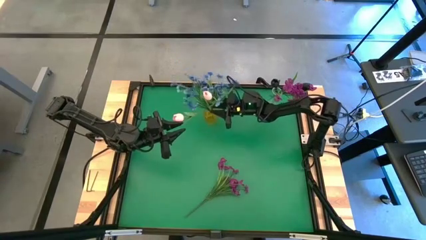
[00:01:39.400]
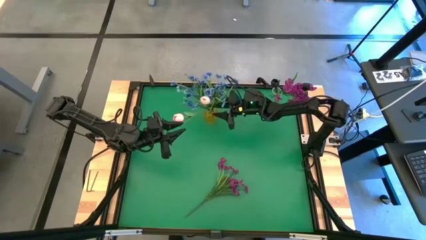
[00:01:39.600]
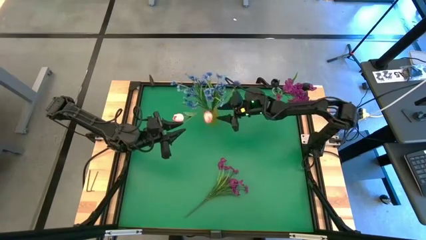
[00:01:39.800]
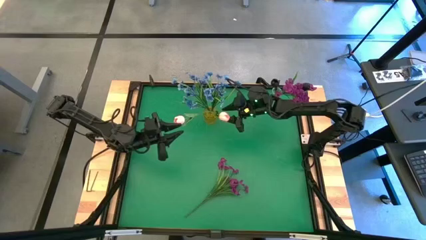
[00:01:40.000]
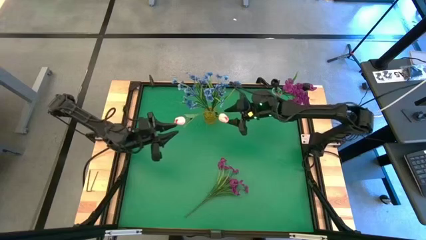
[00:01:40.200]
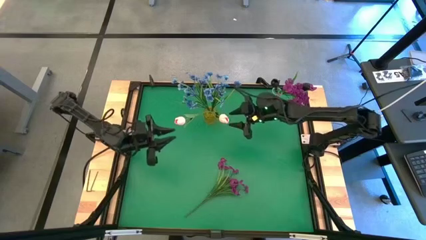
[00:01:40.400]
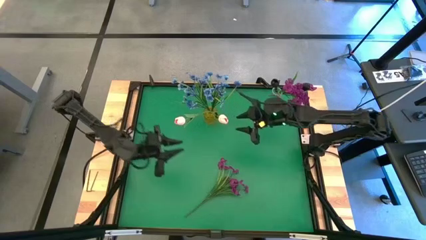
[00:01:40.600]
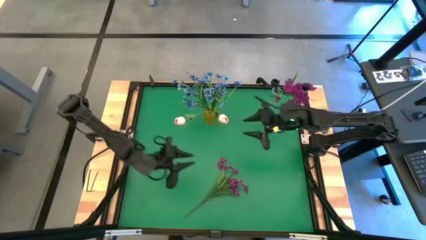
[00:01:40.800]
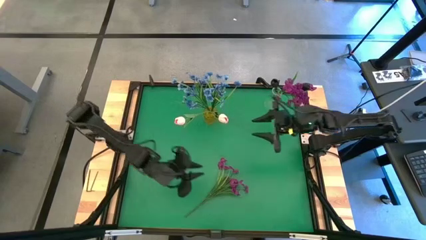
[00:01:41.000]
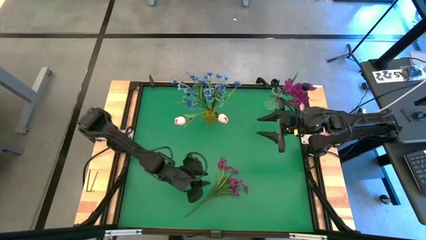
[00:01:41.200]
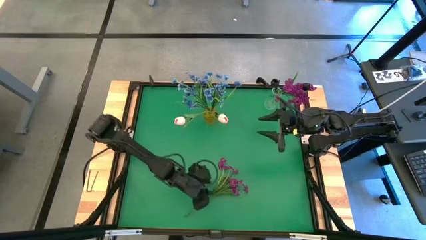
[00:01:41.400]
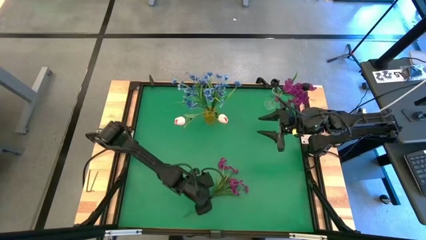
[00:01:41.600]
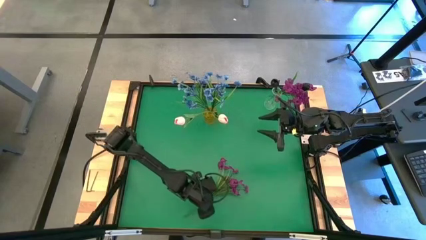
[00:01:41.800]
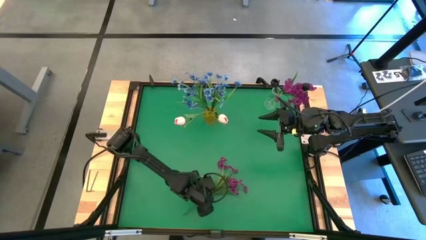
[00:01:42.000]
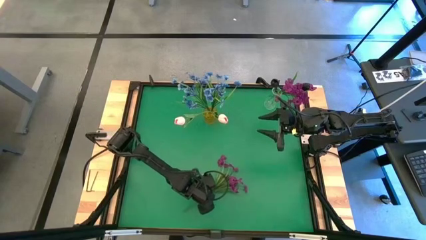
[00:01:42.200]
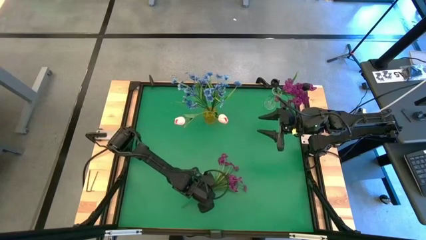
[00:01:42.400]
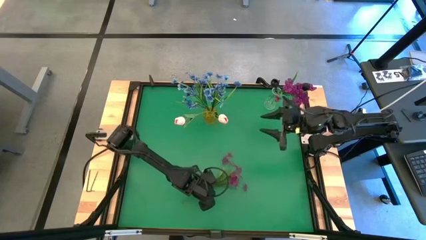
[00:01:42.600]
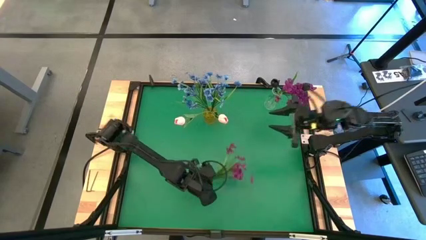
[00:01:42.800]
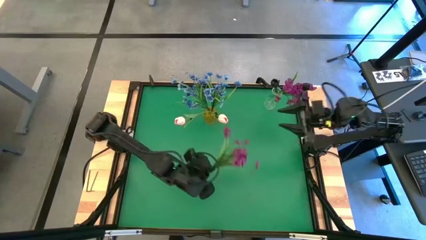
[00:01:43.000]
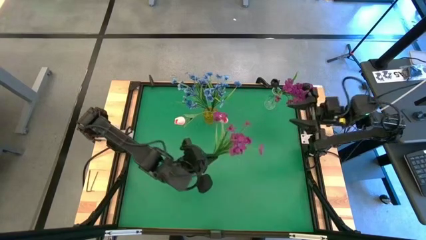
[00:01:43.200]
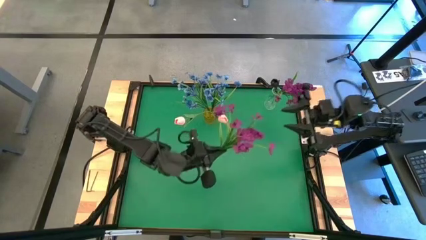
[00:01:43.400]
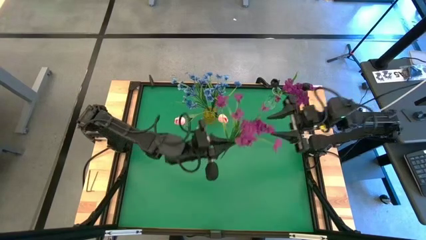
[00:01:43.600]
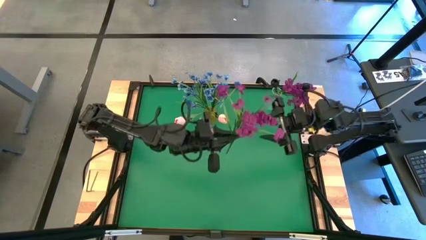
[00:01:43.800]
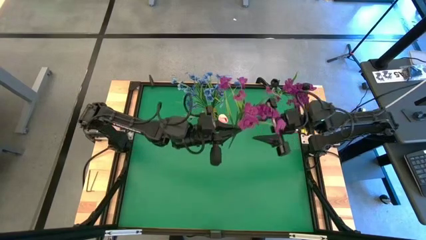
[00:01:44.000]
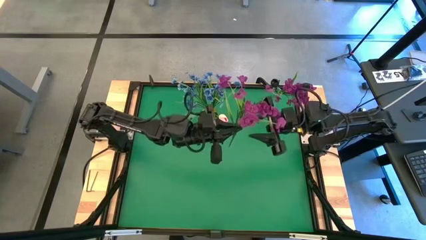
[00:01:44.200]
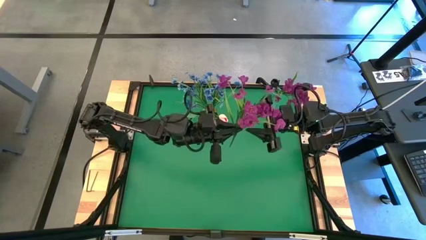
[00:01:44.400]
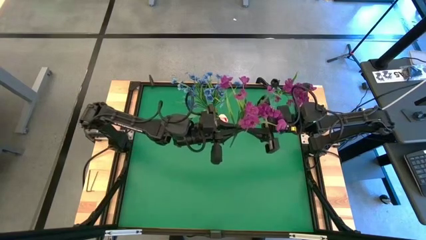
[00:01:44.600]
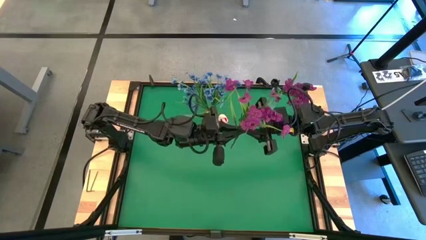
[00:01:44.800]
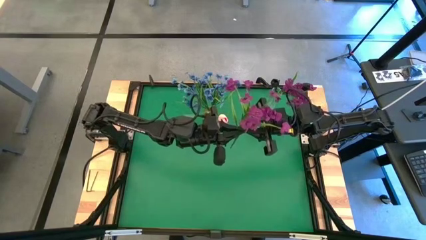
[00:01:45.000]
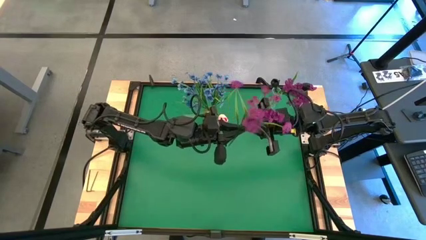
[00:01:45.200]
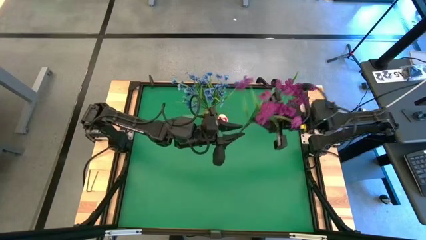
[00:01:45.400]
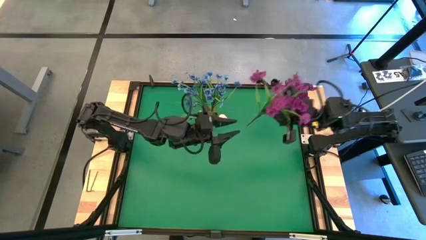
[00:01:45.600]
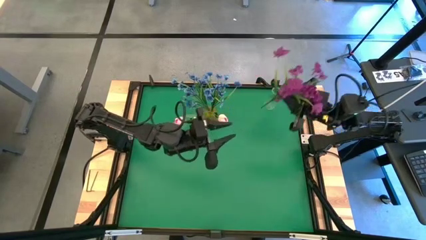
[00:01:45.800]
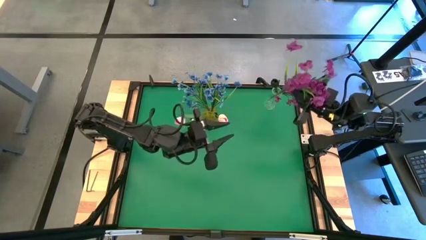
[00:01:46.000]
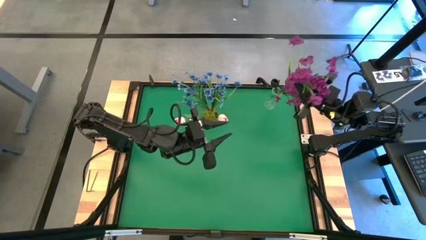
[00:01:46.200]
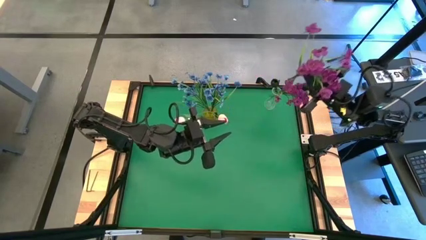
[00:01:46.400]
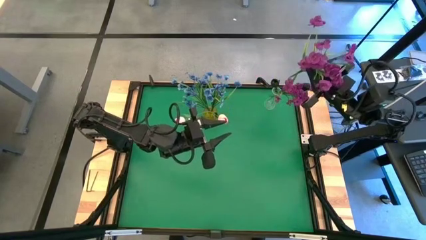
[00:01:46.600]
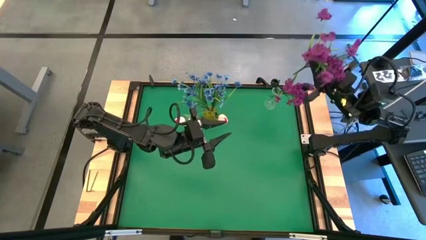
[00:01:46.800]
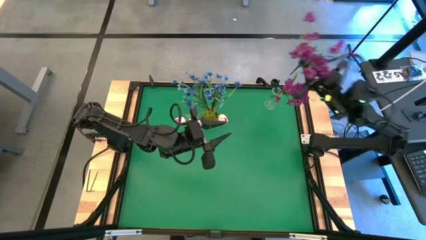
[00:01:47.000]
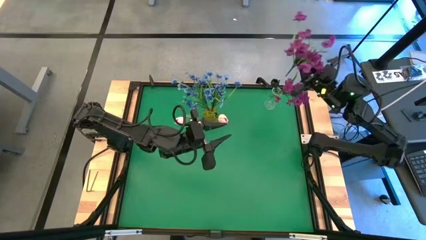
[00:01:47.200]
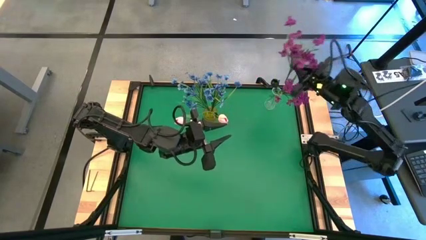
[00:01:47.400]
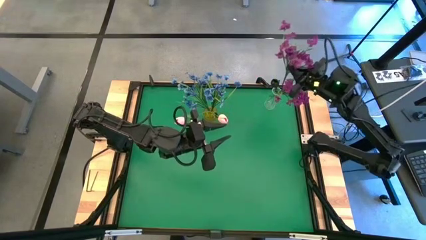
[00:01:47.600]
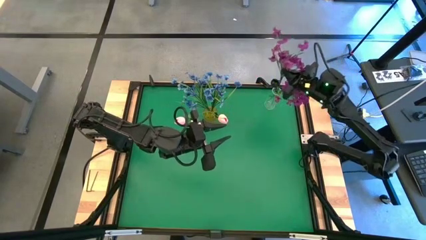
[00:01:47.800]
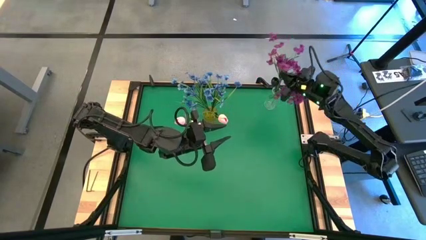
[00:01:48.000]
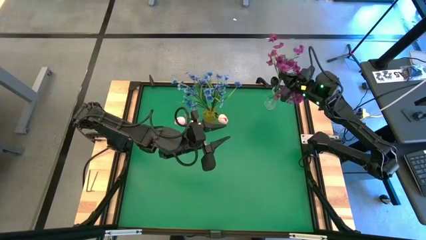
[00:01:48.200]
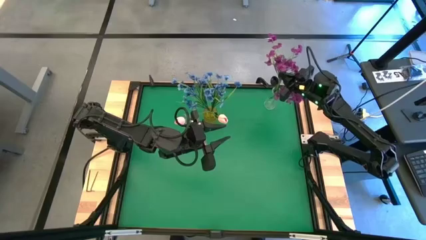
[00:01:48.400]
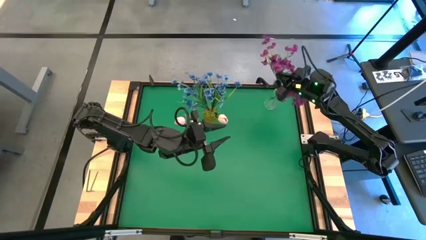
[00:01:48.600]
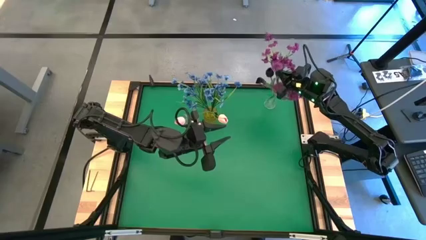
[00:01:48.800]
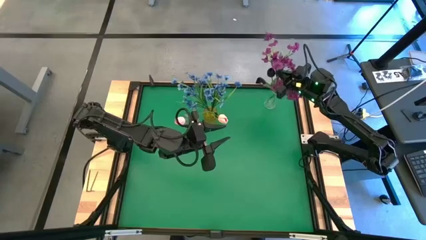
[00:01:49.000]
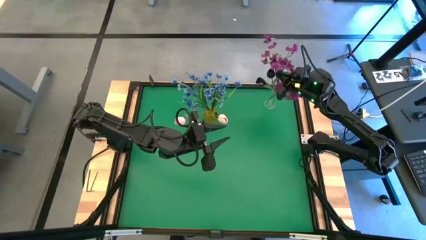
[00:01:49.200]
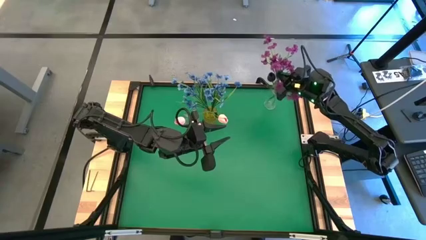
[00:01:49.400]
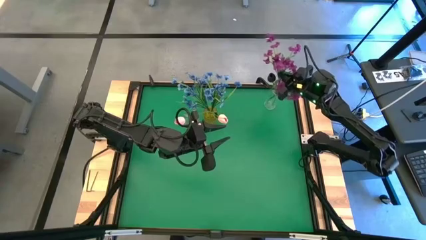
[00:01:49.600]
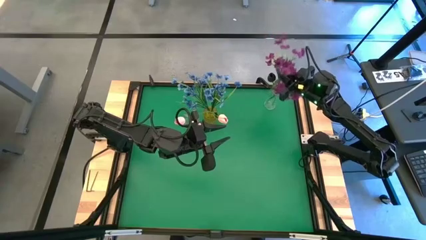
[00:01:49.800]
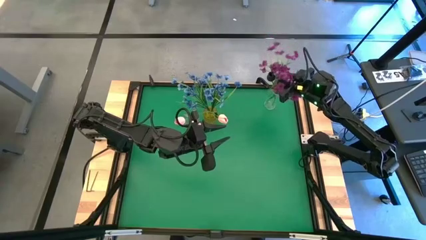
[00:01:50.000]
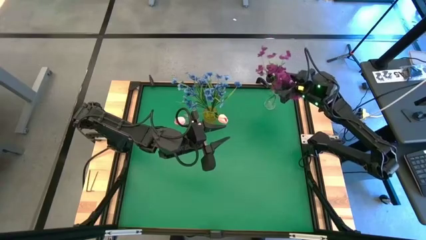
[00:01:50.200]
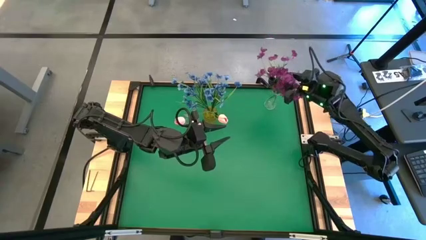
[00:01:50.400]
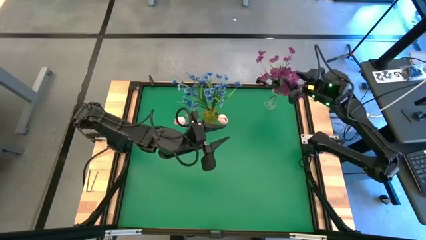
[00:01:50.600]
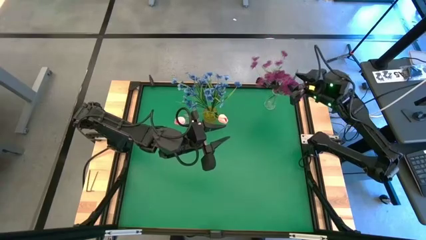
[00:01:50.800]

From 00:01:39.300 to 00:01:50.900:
Task: Sort flowers into vase by color
Put the violet flowers into the transparent vase
